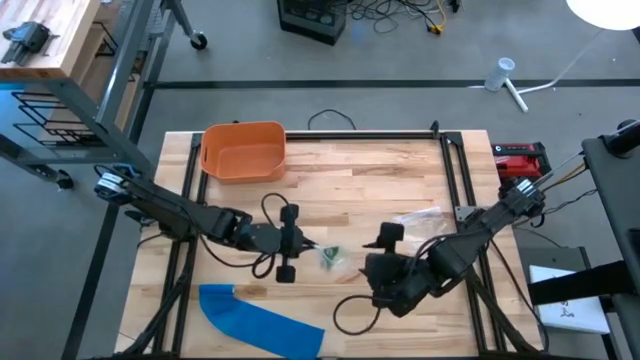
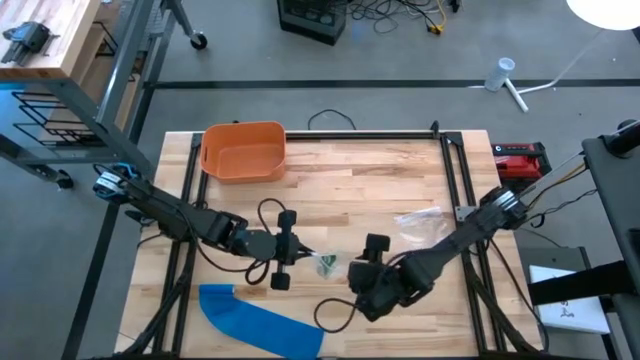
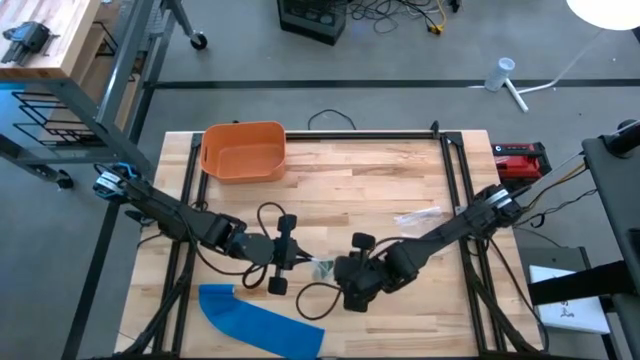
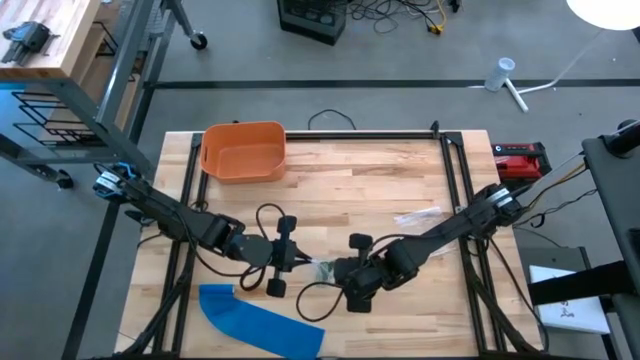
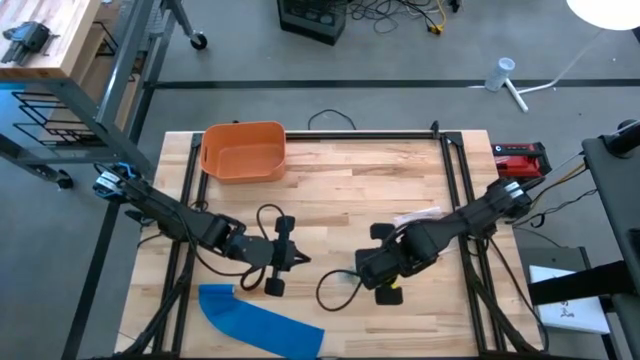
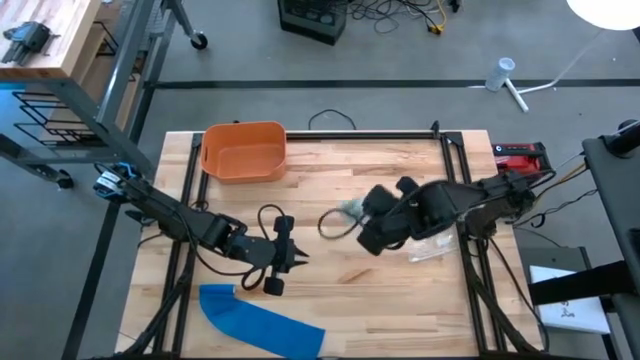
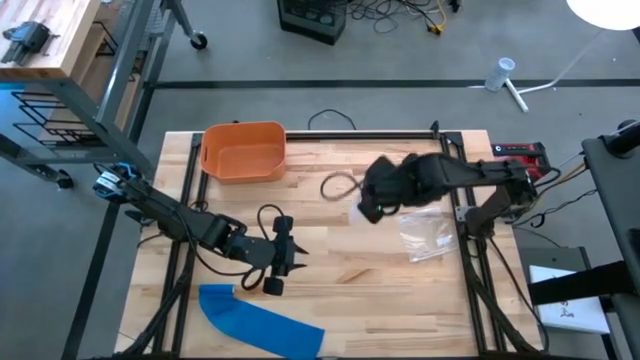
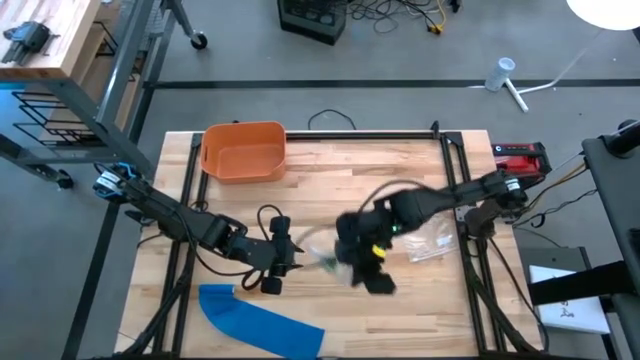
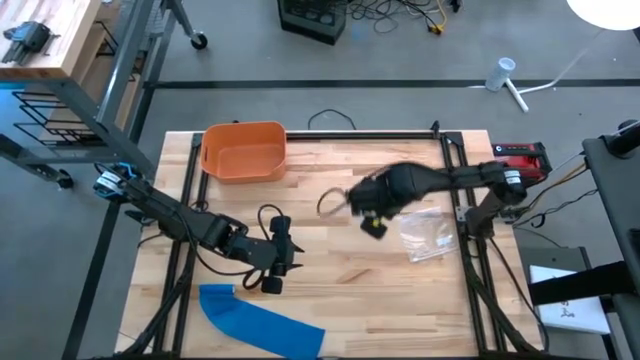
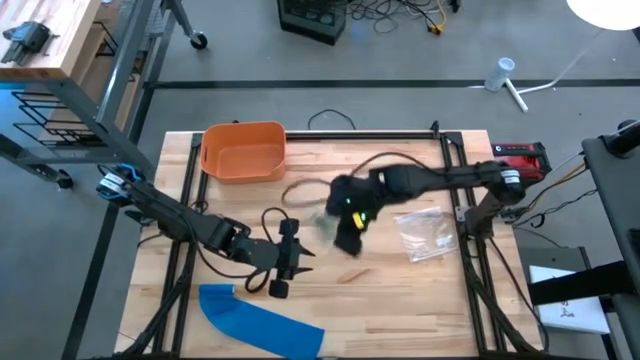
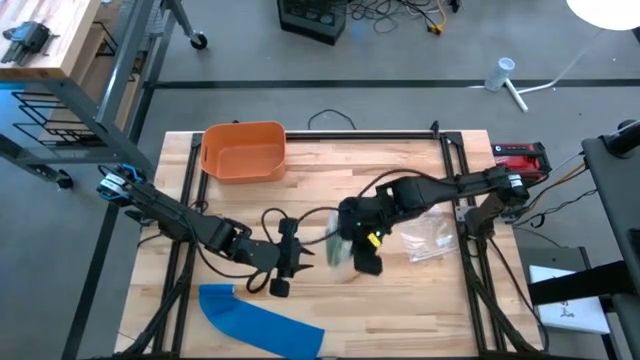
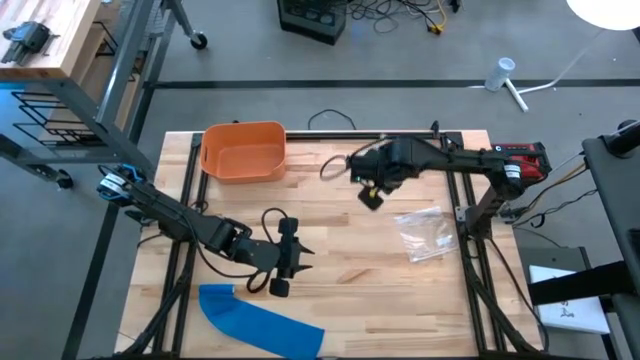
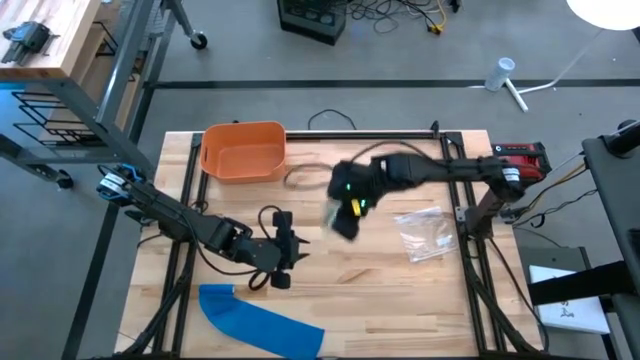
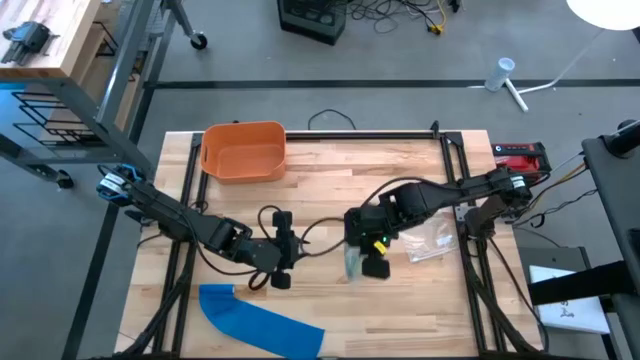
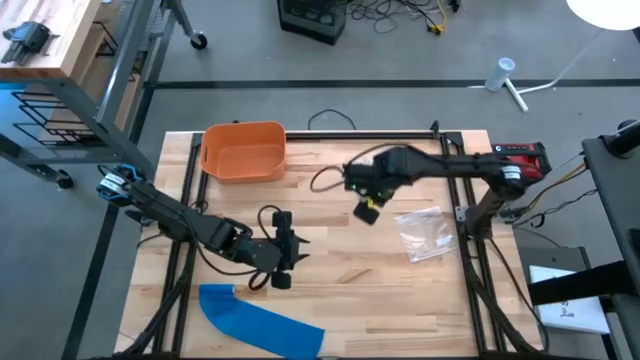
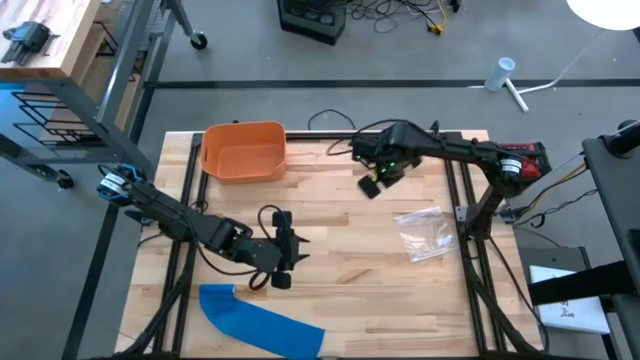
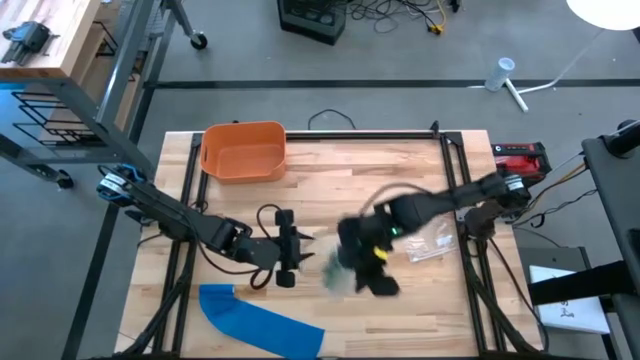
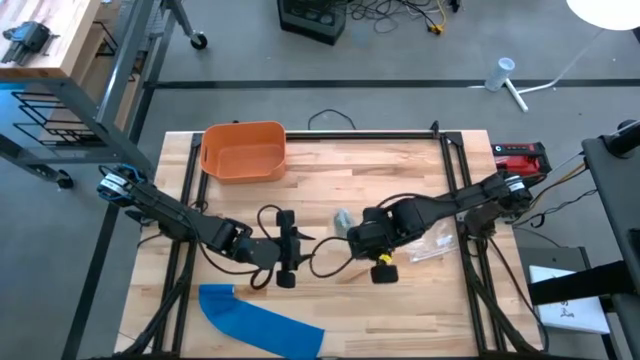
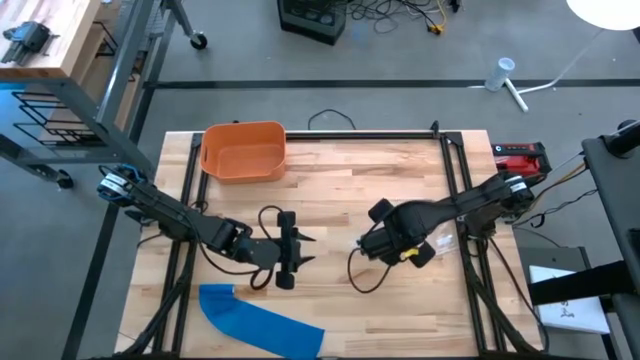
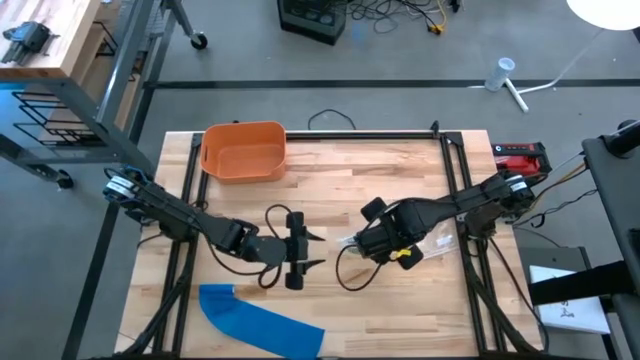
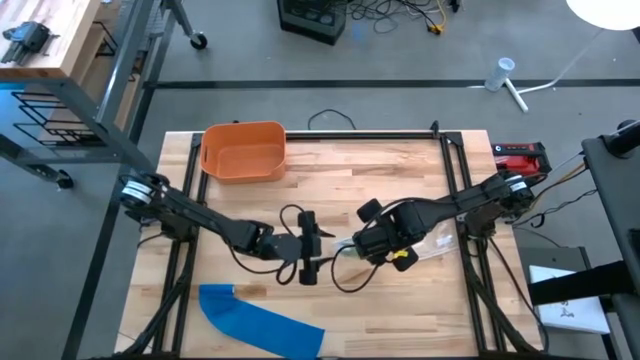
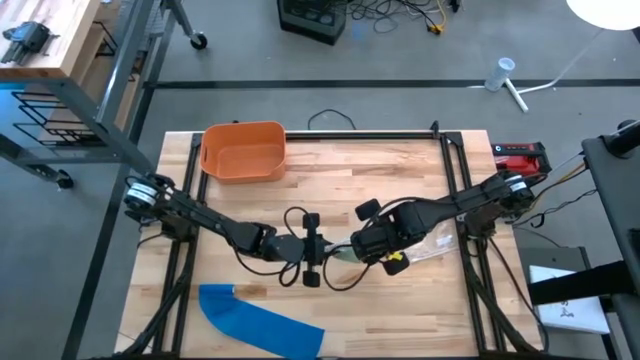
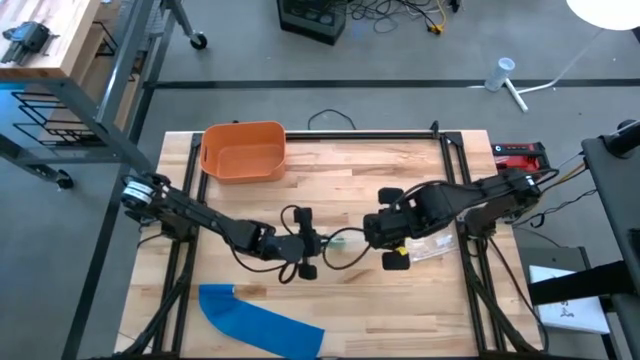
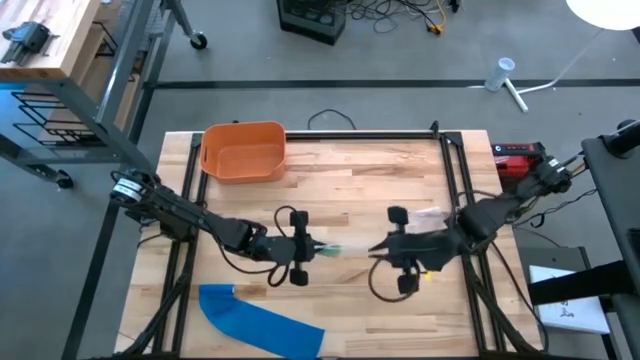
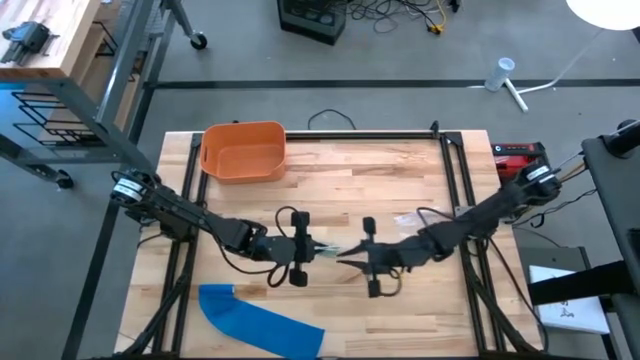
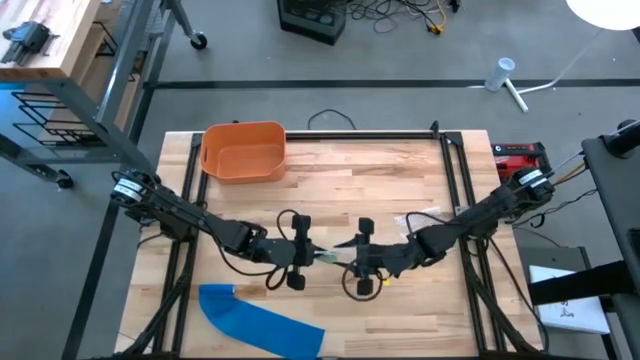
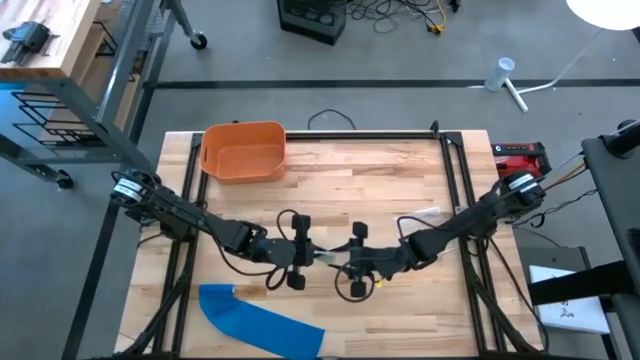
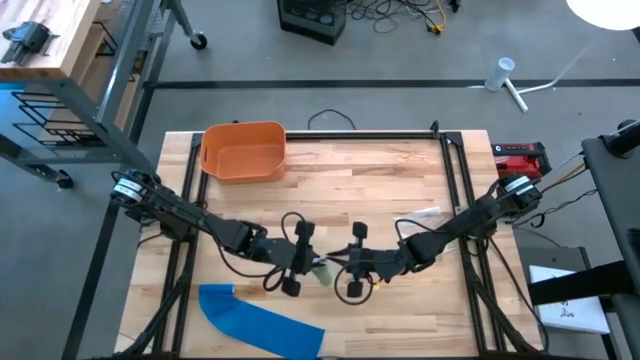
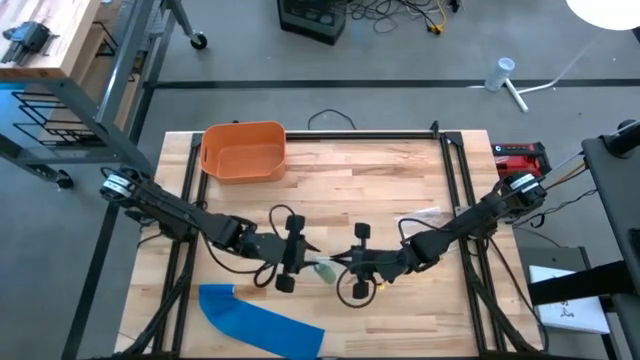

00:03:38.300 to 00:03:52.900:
Task: Roll bandage
Close the transparent zip bag

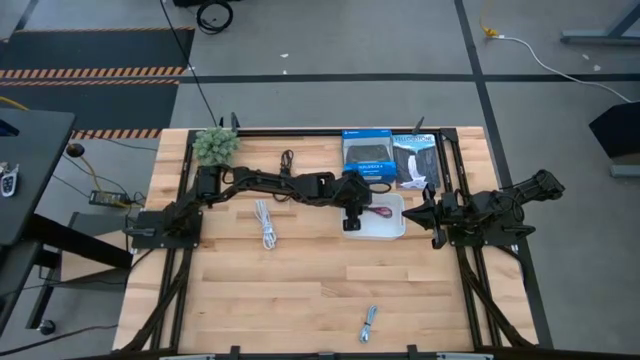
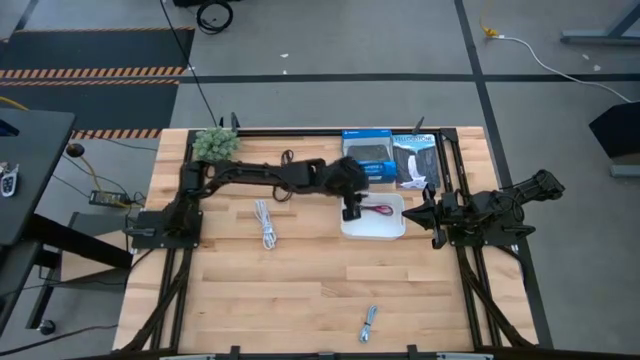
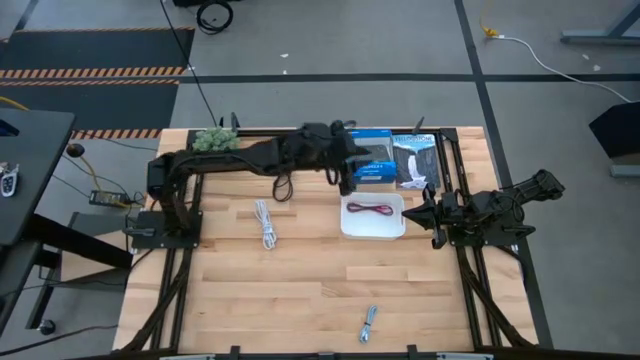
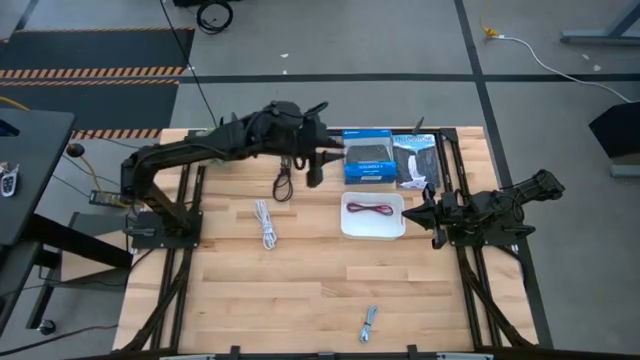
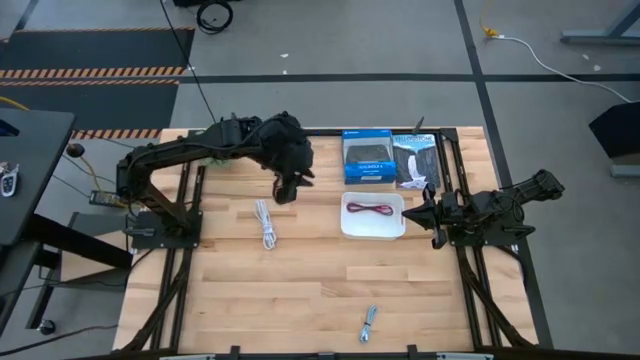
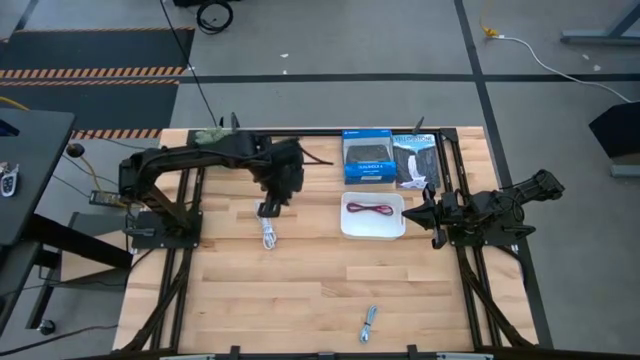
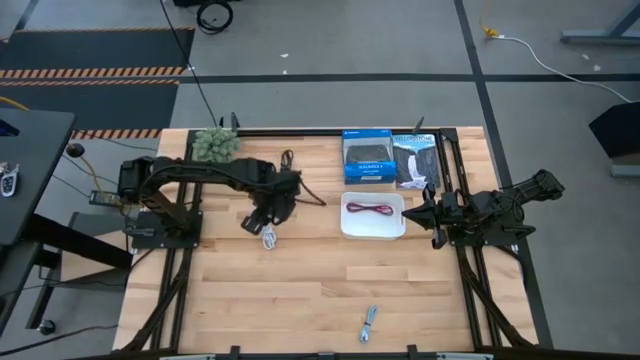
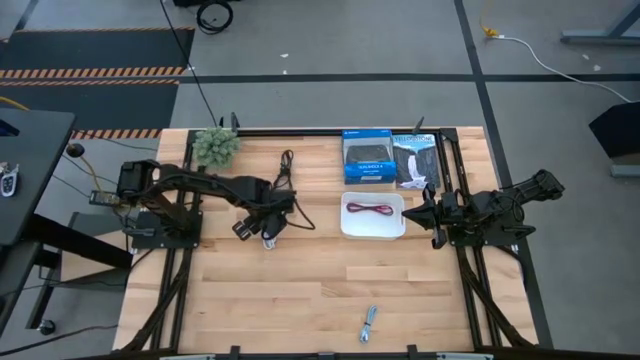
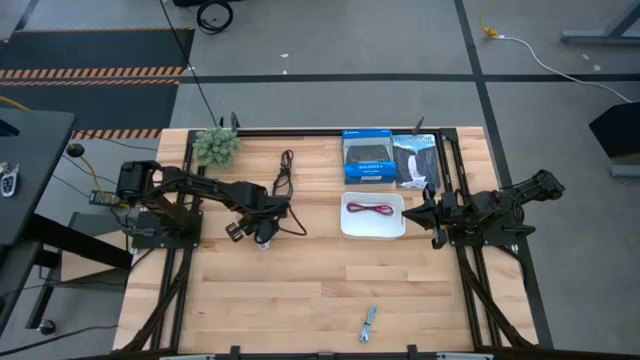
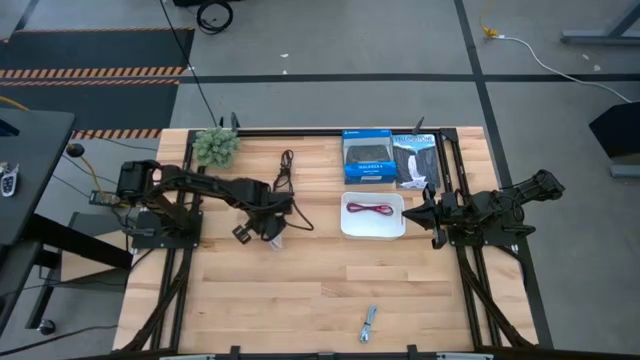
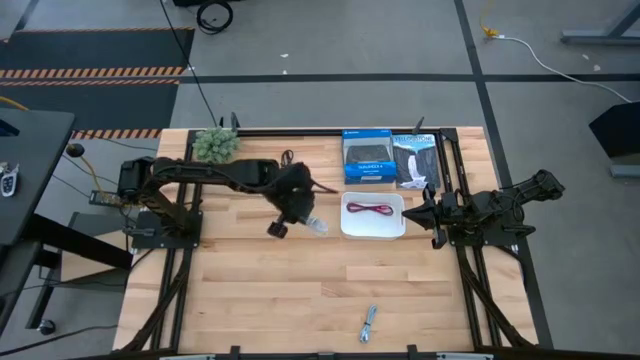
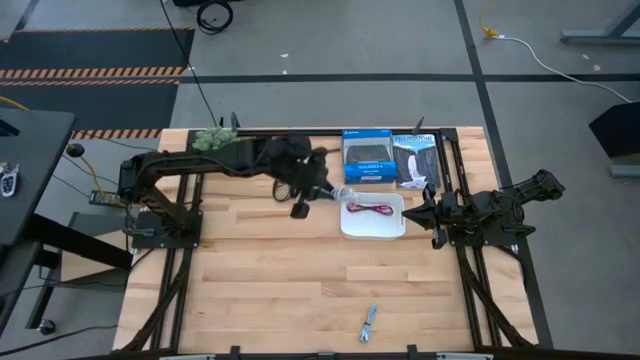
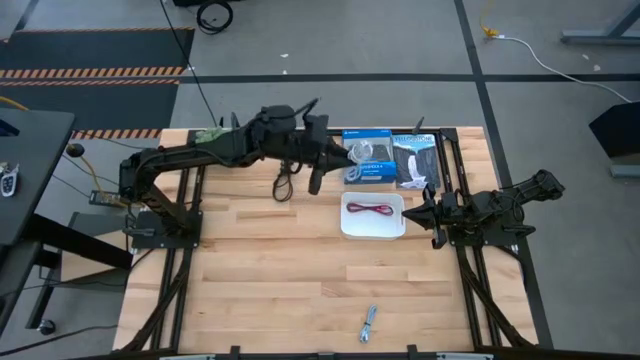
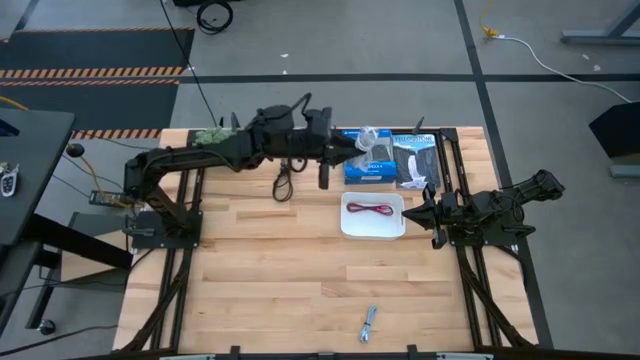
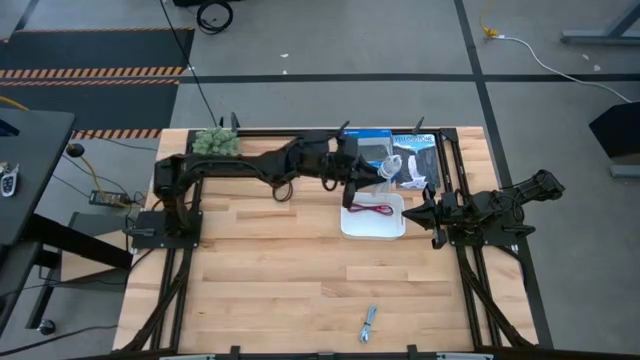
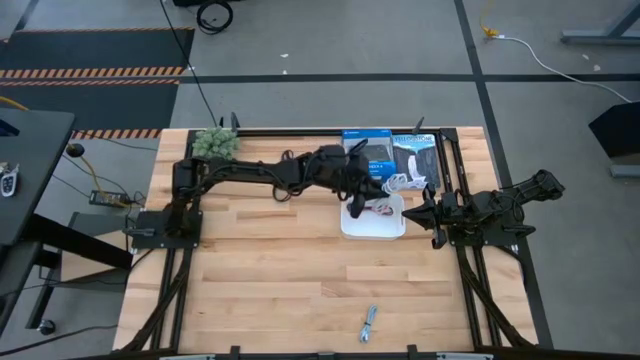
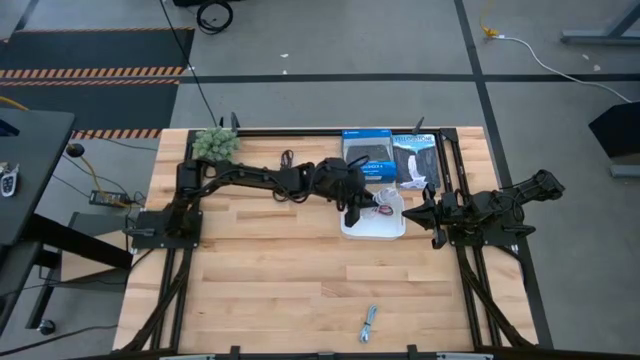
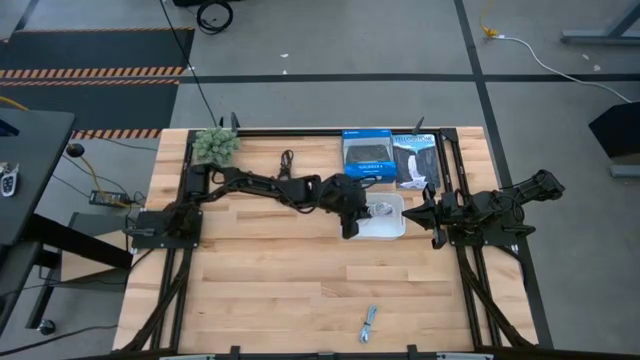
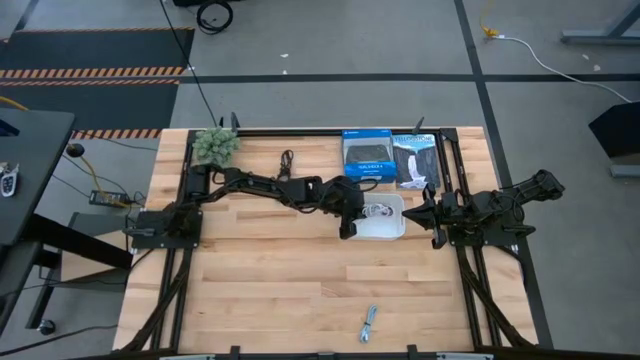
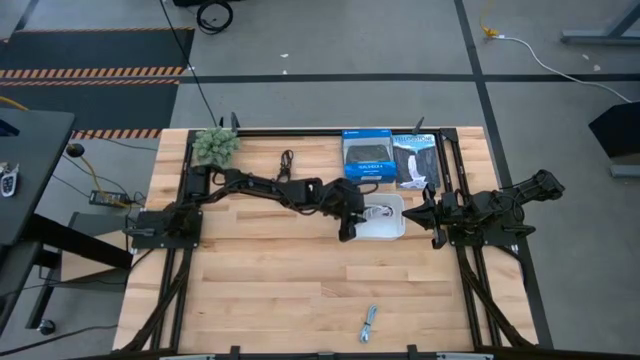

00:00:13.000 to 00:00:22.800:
Task: Pick and place USB-C Cables
Put the white charger cable into the white bin
